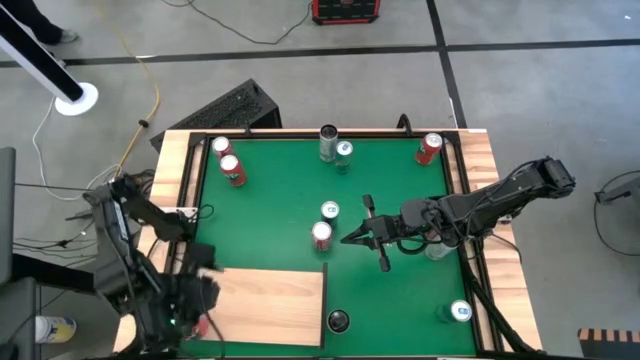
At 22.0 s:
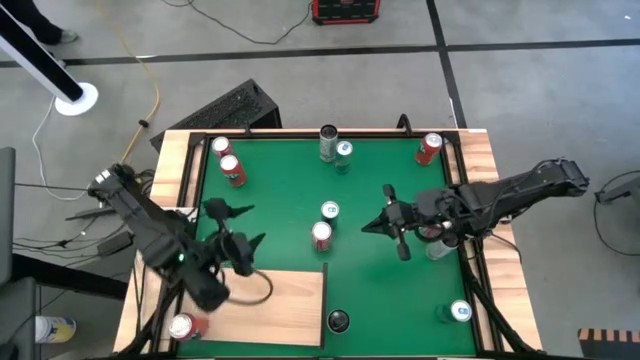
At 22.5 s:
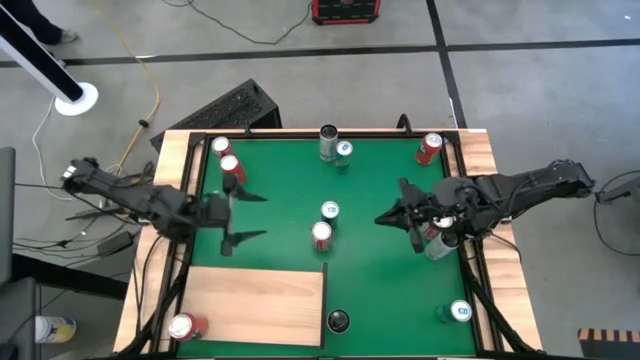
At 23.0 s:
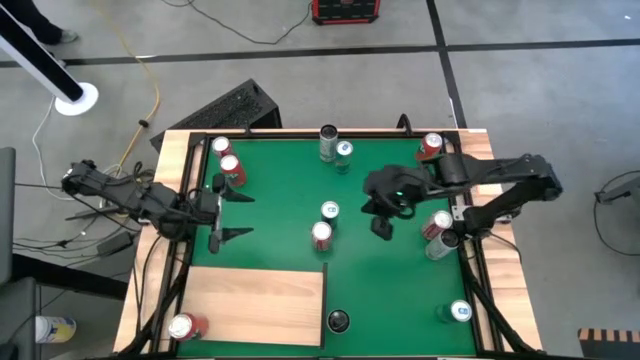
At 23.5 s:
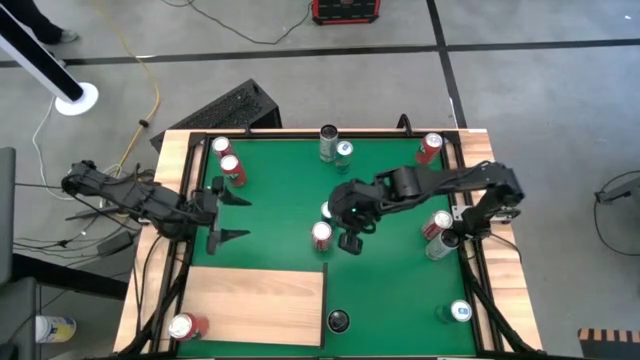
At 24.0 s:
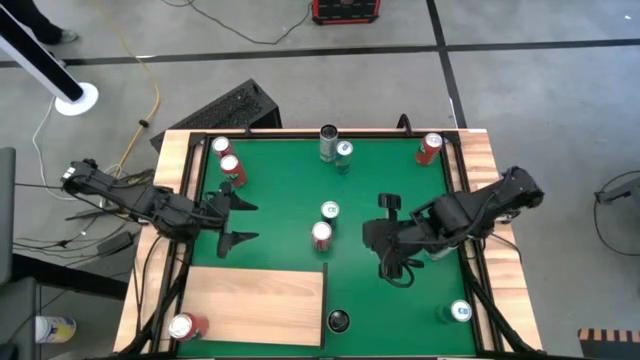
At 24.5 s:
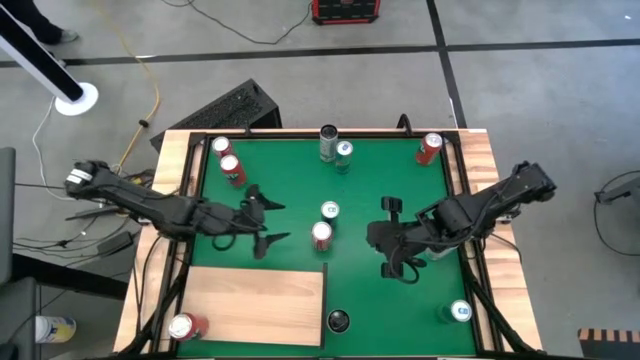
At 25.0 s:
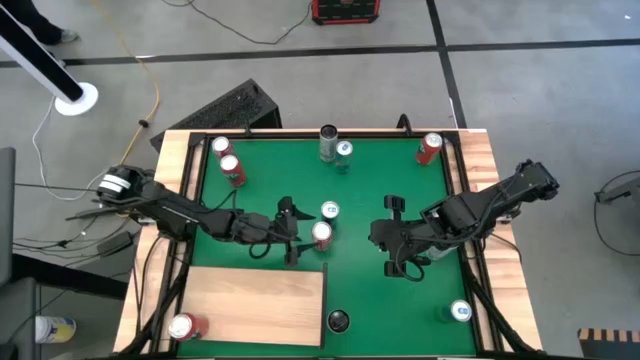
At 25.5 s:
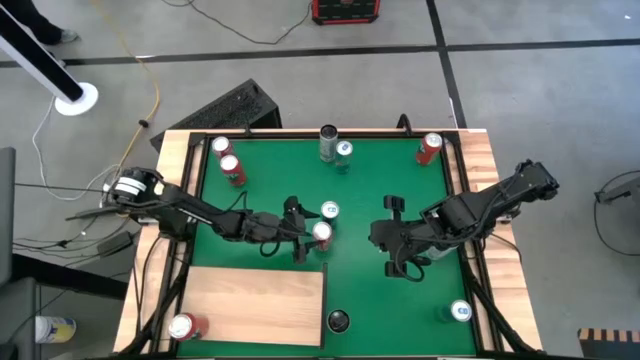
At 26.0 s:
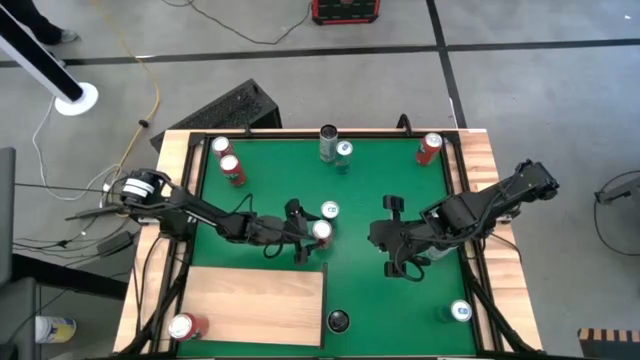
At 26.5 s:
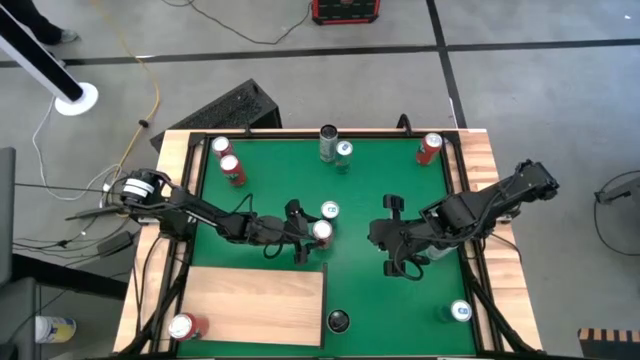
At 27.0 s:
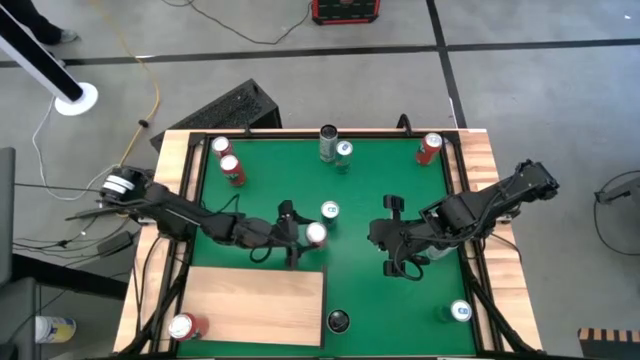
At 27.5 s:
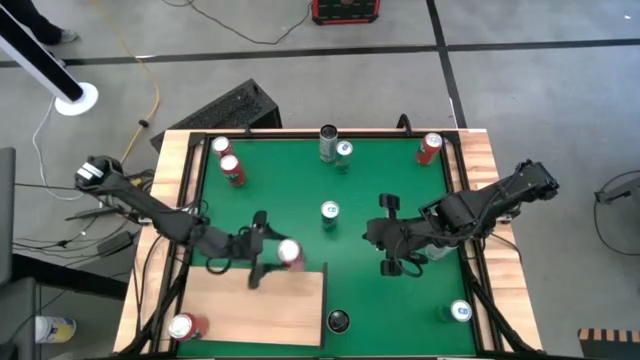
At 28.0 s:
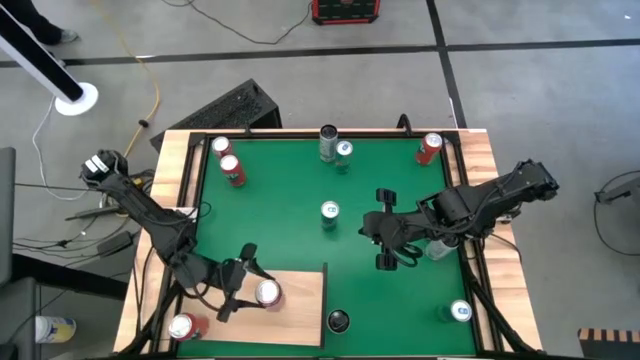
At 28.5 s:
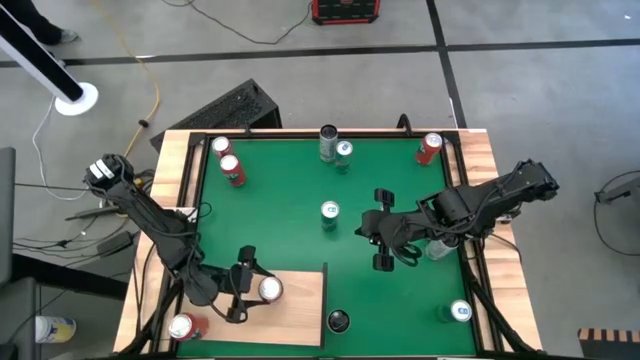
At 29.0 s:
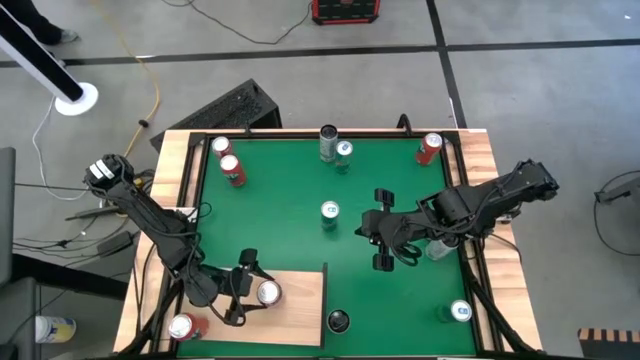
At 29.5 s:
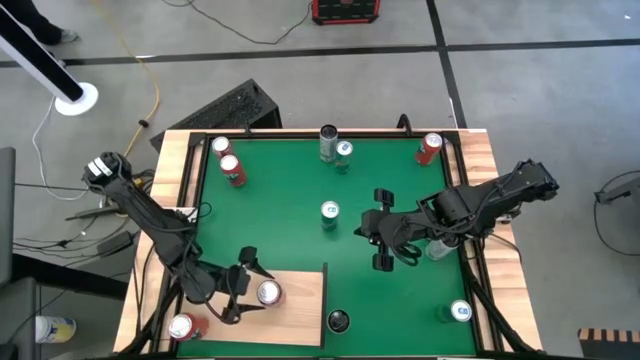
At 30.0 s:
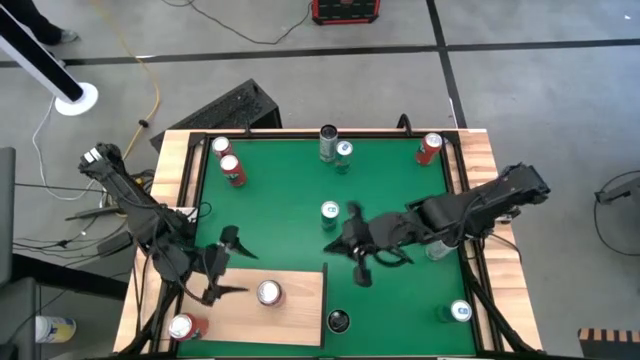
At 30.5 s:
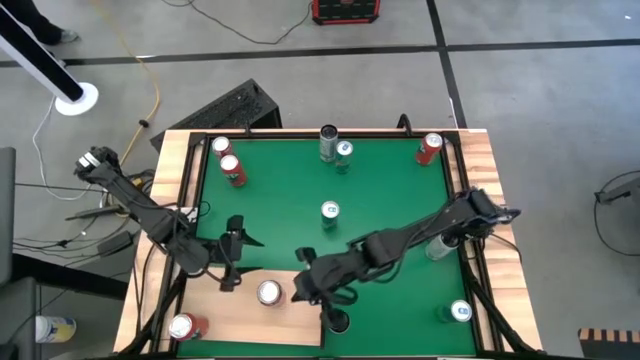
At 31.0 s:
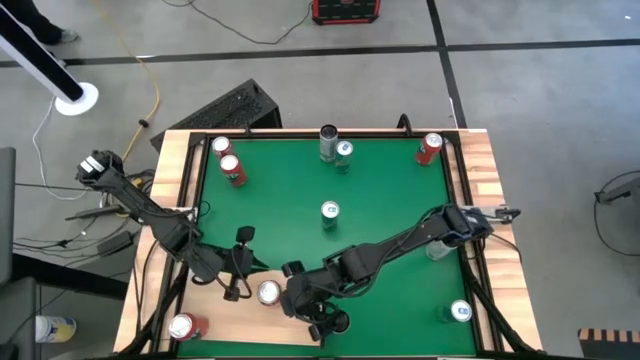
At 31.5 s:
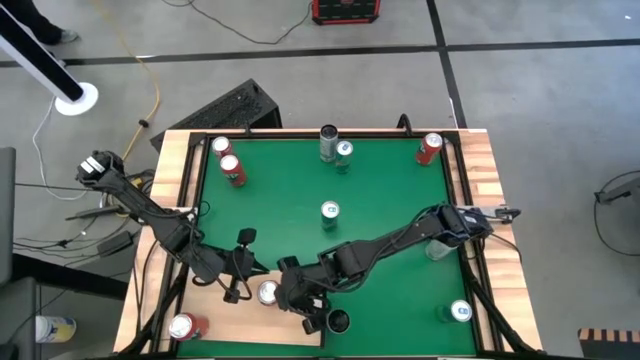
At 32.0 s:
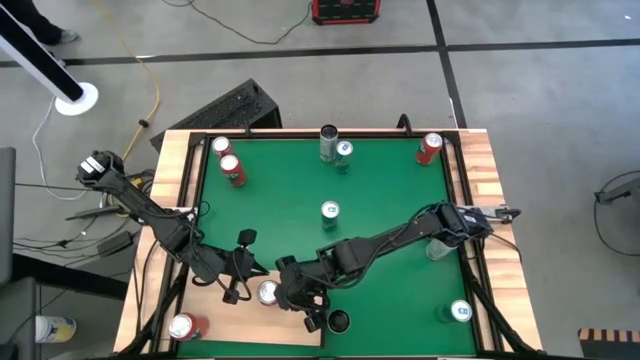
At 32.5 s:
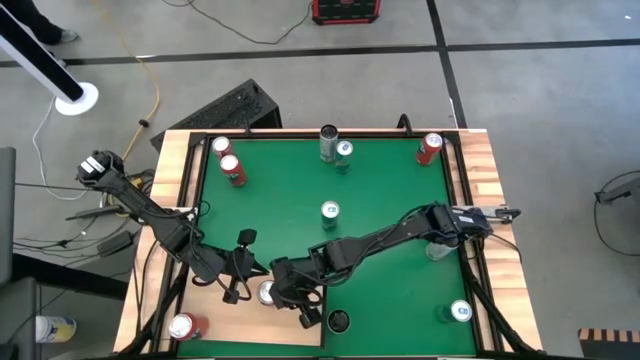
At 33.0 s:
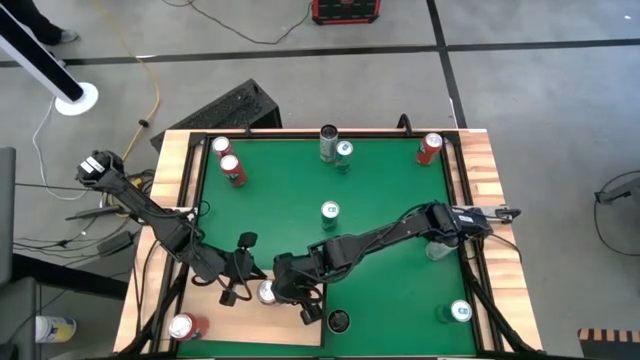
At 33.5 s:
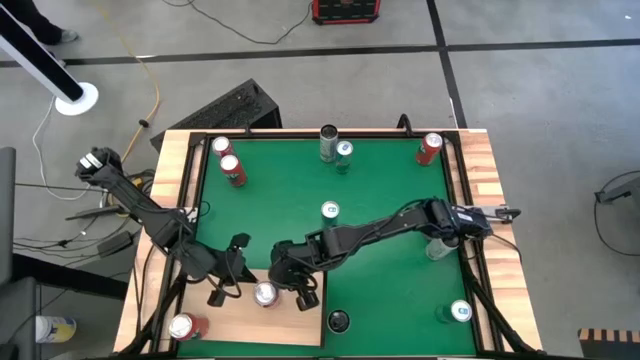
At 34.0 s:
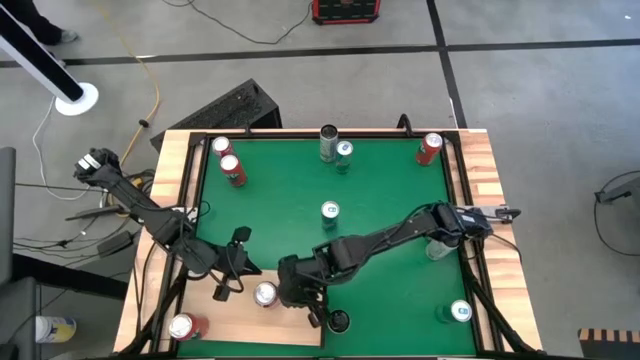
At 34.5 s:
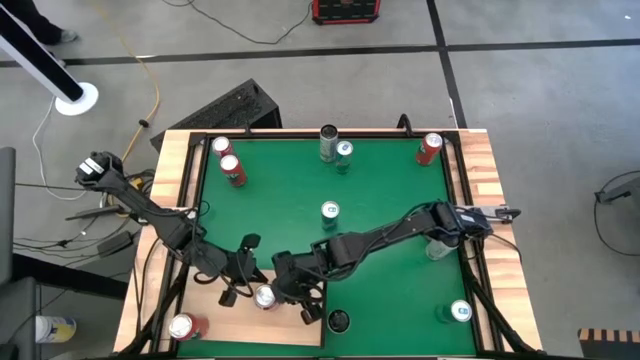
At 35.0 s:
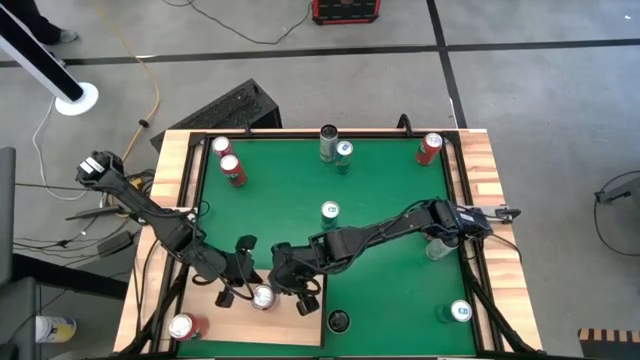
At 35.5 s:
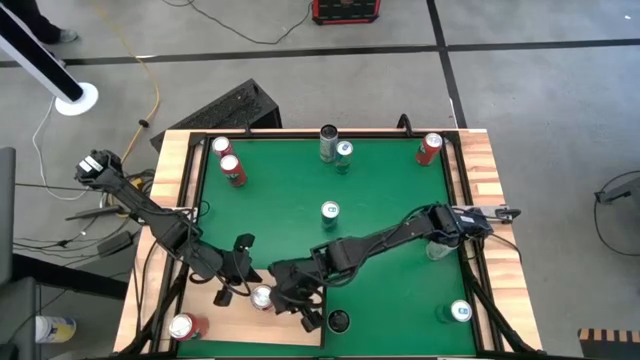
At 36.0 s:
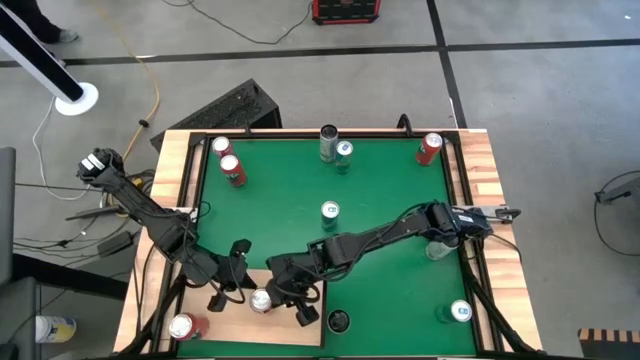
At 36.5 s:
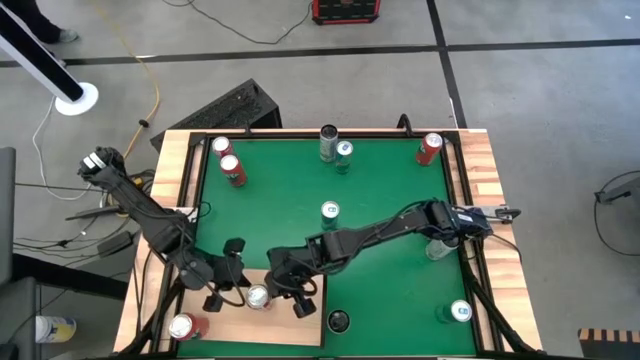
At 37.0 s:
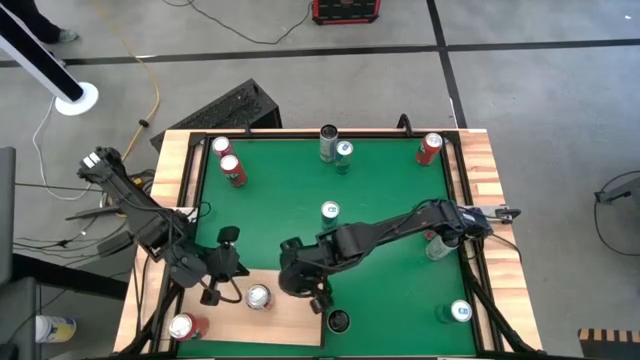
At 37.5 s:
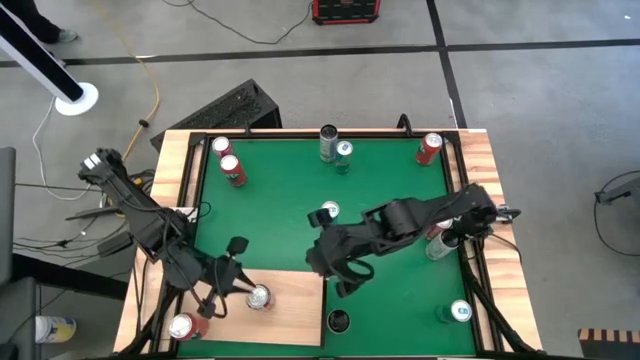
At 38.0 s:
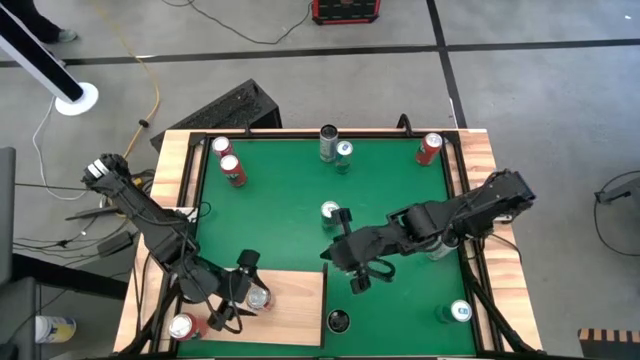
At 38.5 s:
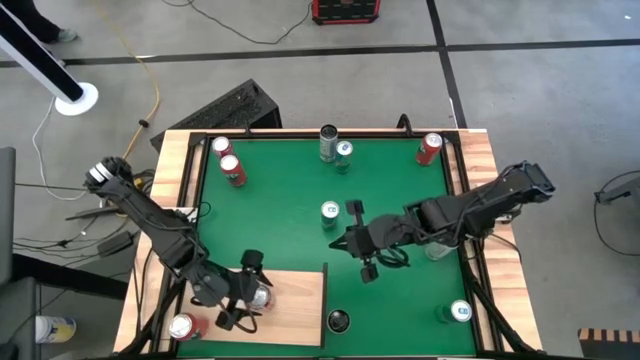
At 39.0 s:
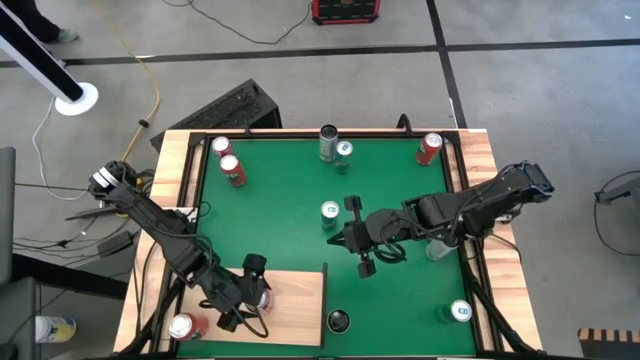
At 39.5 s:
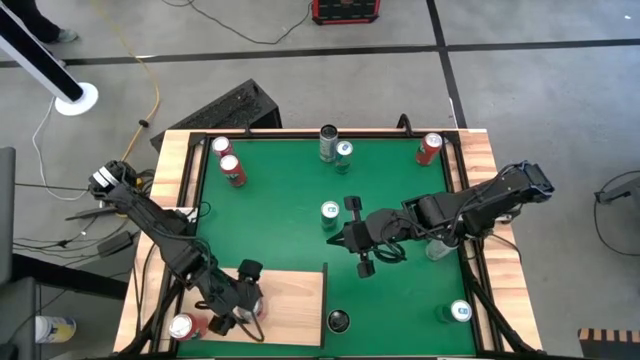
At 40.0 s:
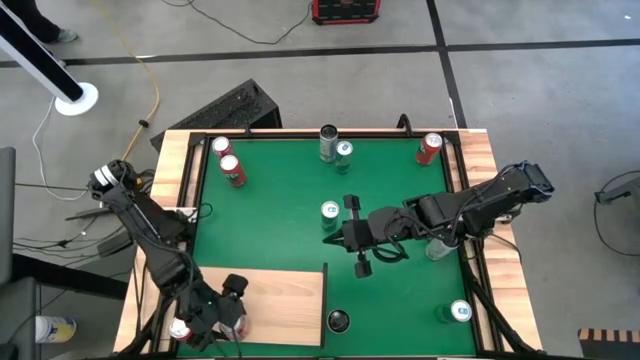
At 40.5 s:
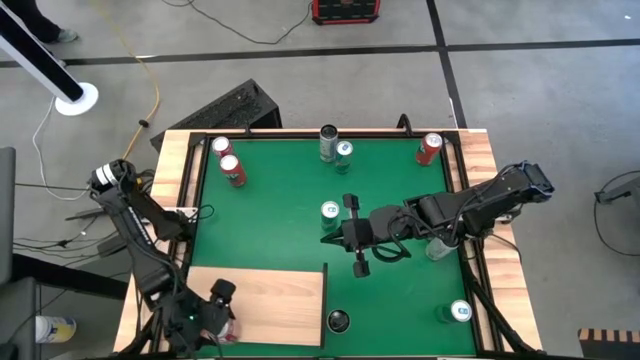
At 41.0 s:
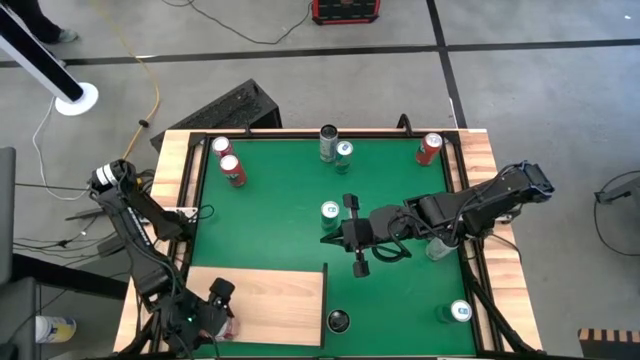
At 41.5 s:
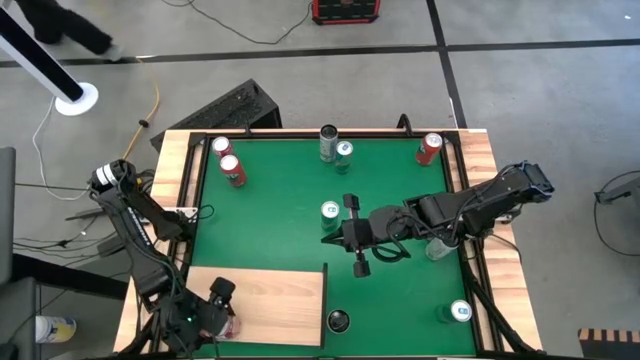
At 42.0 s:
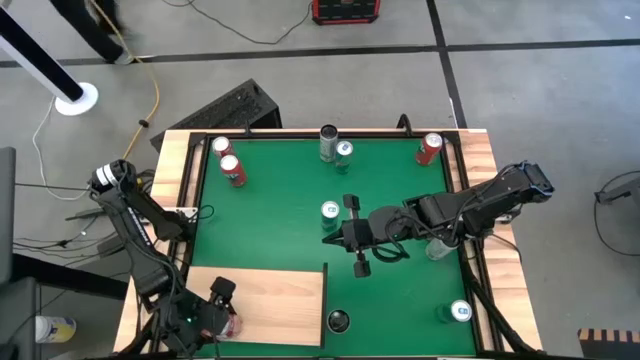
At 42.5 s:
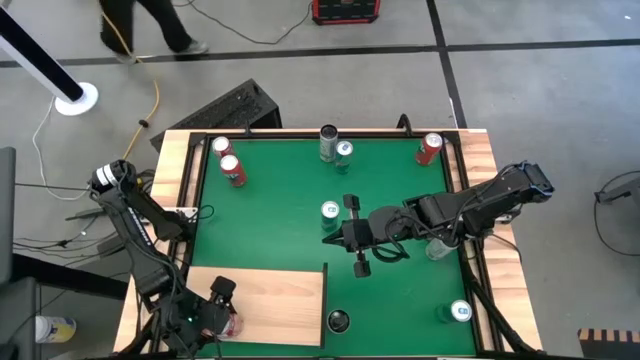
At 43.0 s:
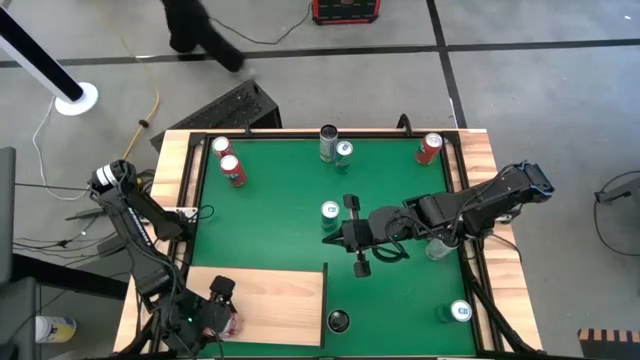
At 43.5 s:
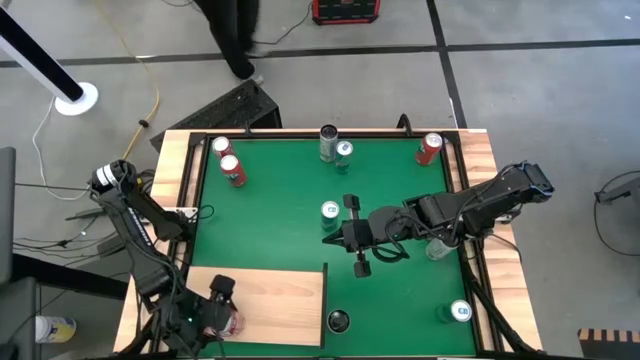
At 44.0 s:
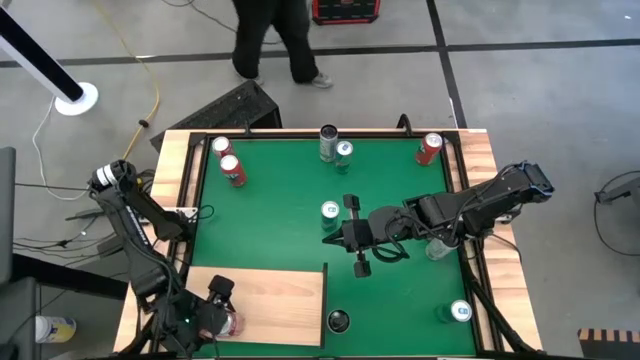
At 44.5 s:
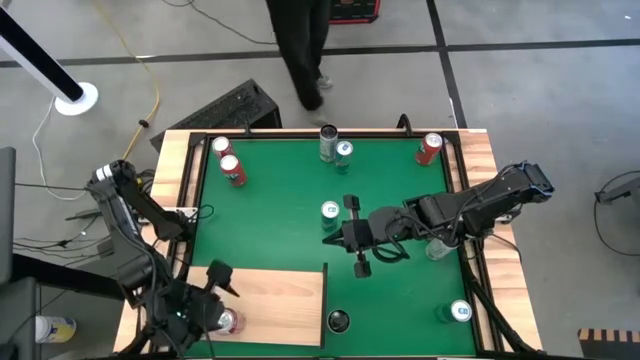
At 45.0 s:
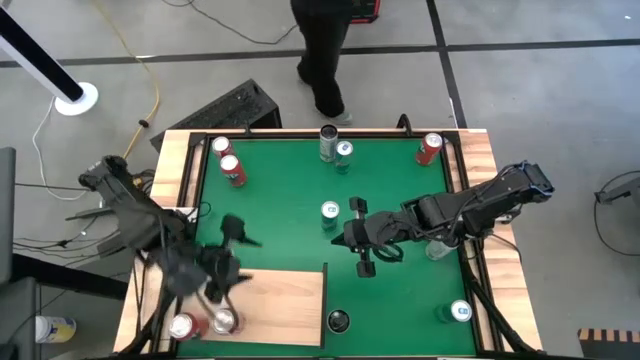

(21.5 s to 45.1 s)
Task: Place canned beverage on shelf
Put the bottom left red soda can on the shelf
